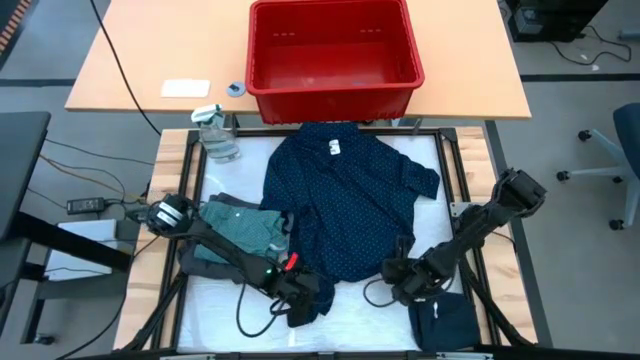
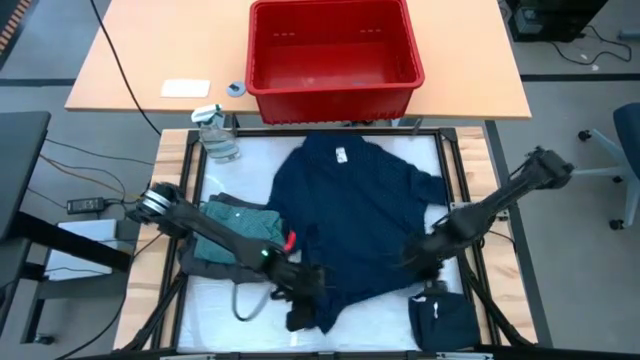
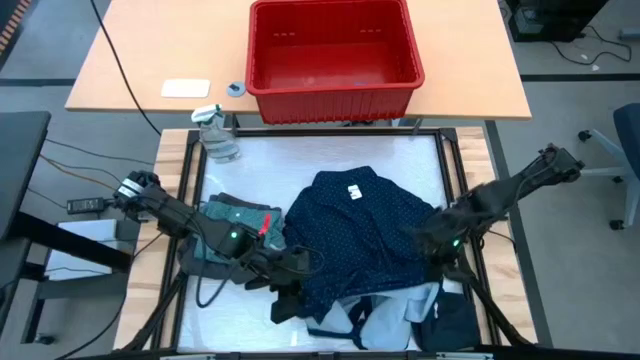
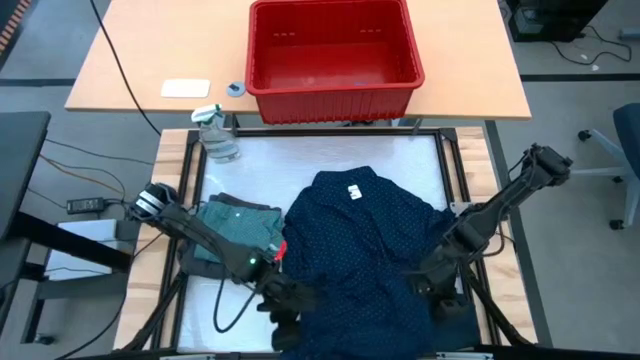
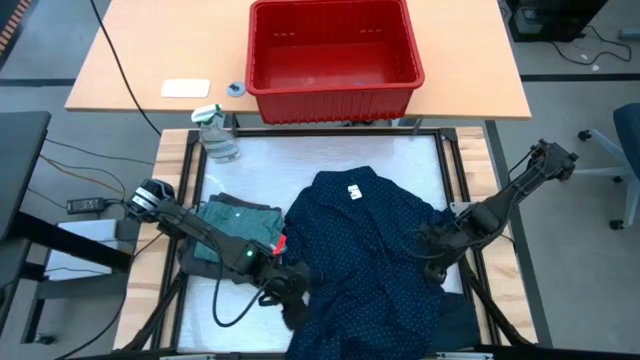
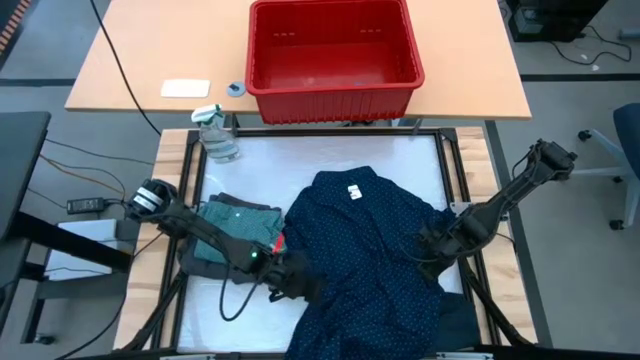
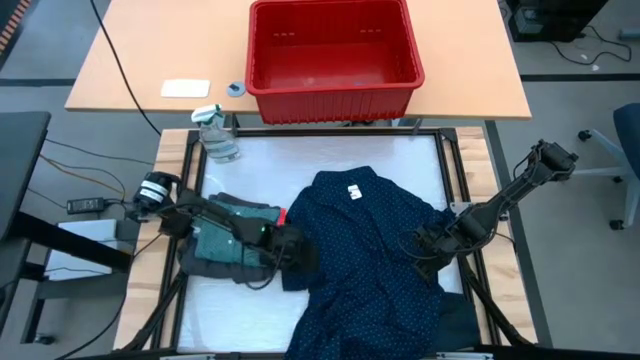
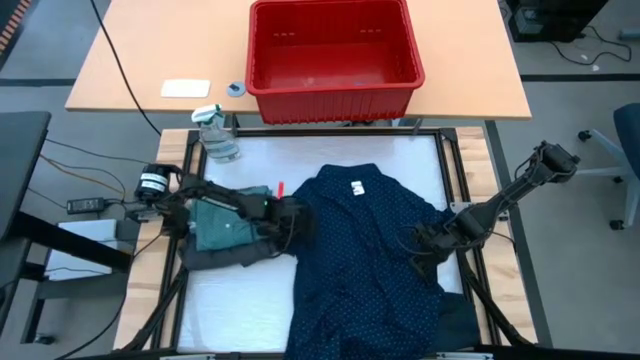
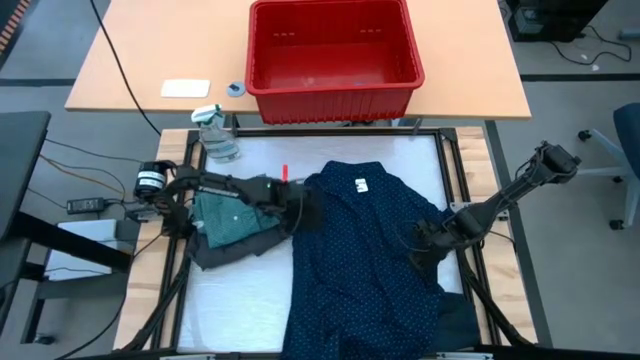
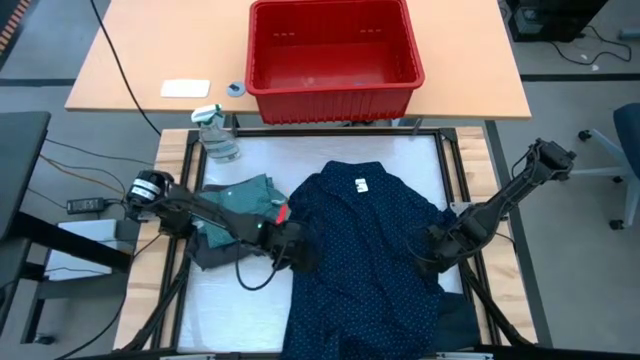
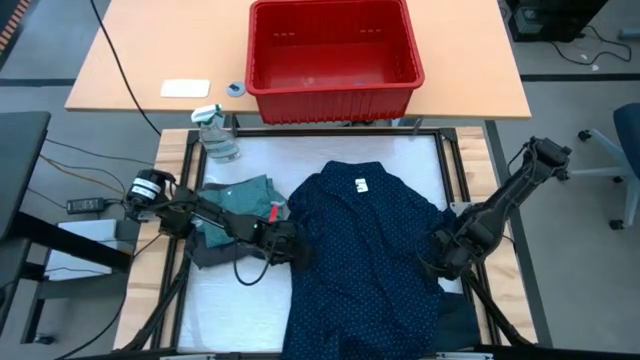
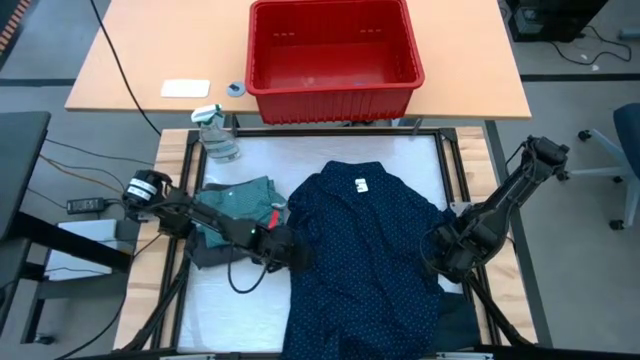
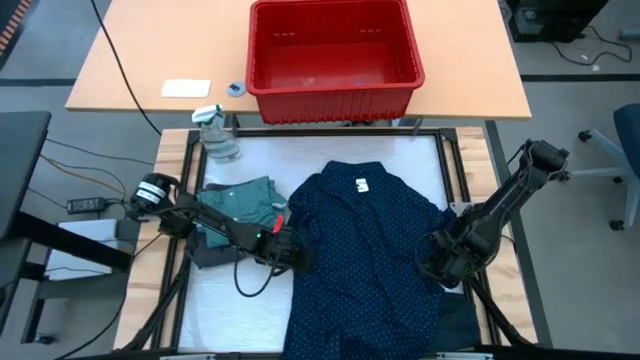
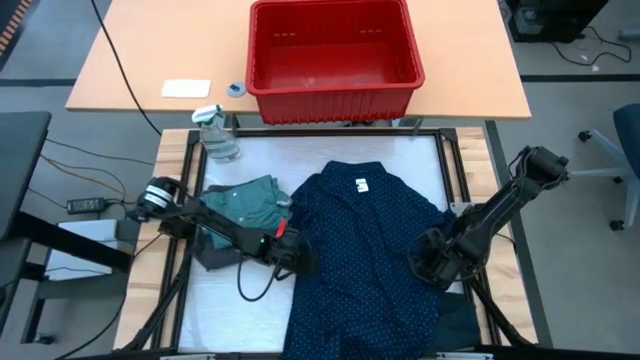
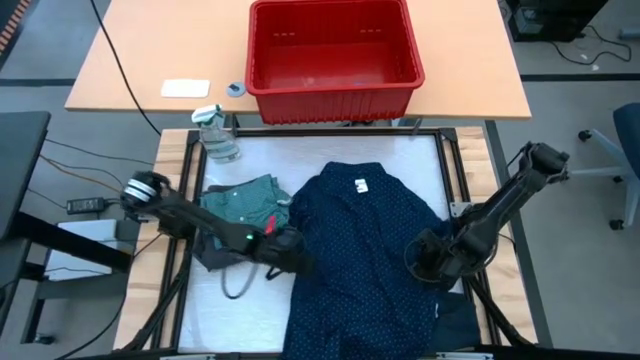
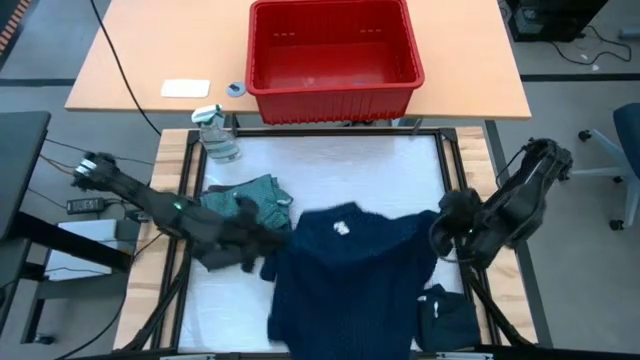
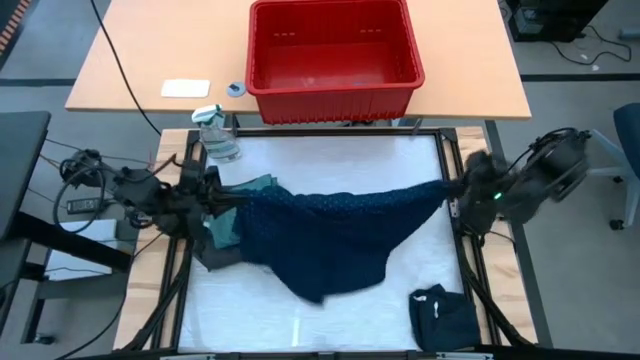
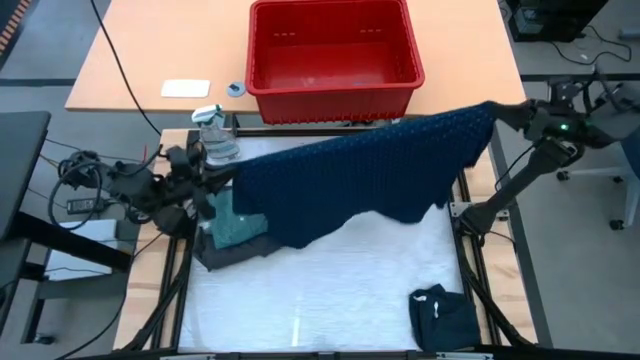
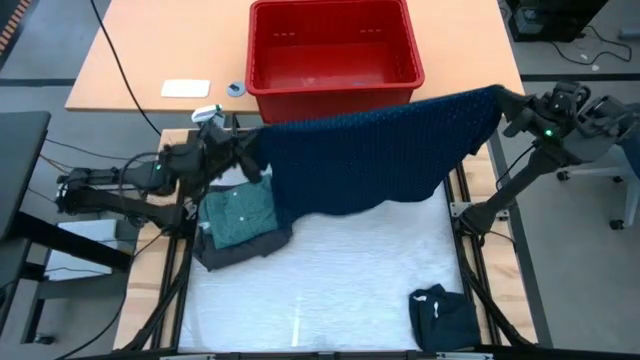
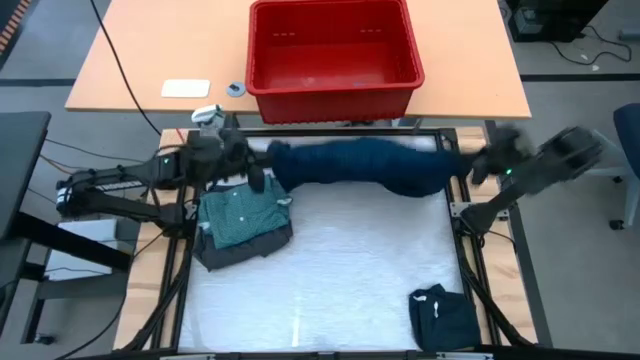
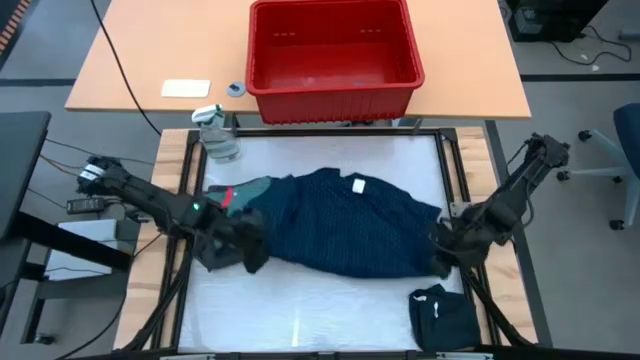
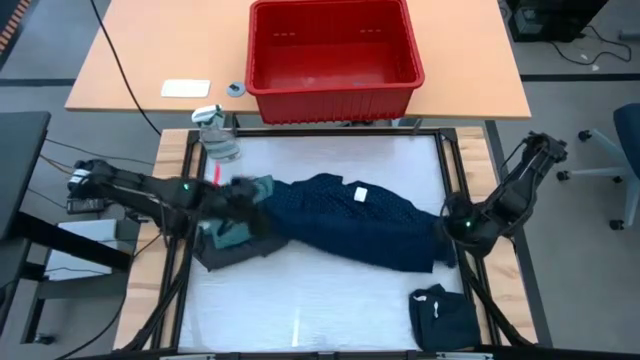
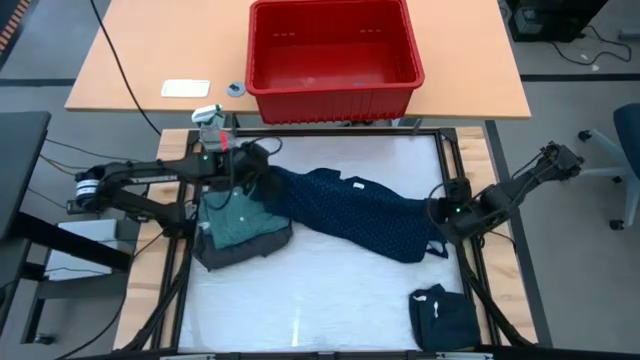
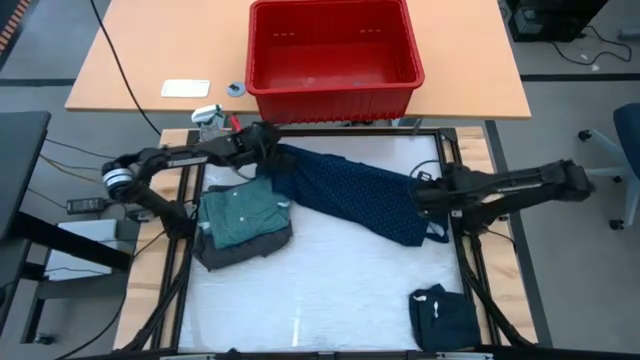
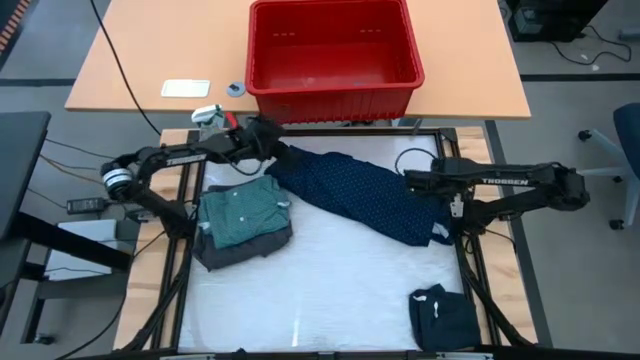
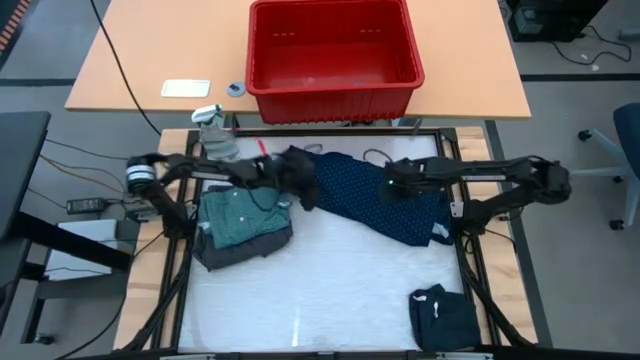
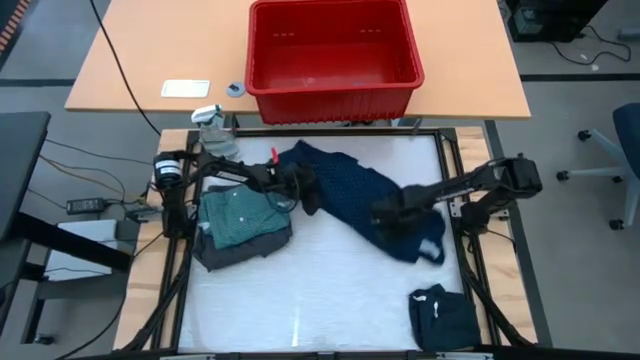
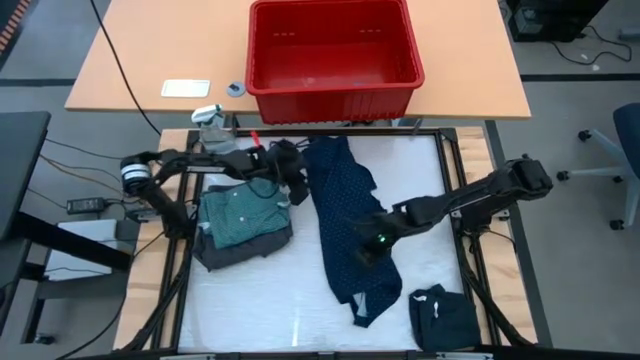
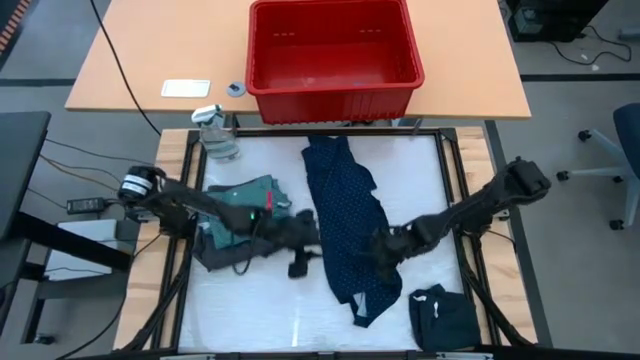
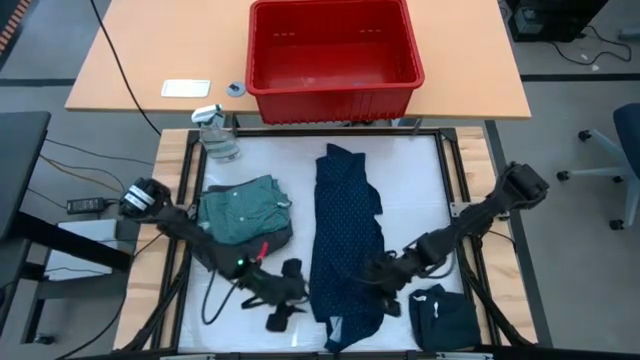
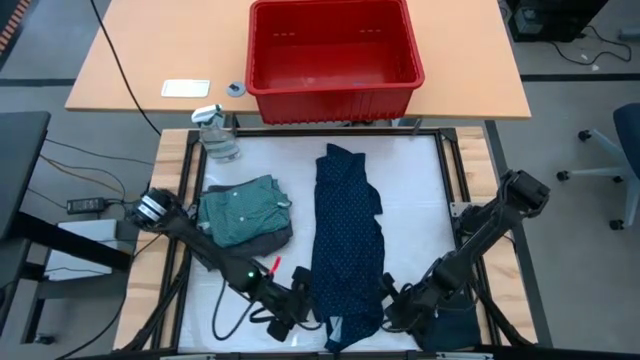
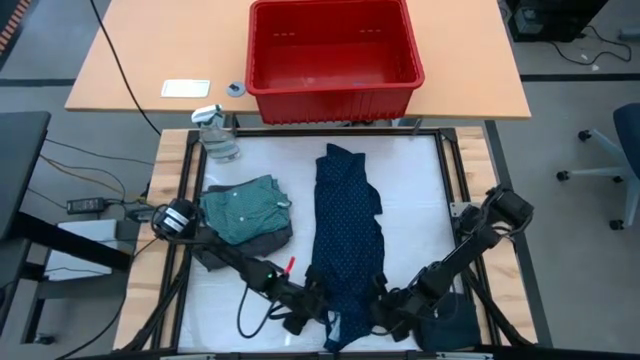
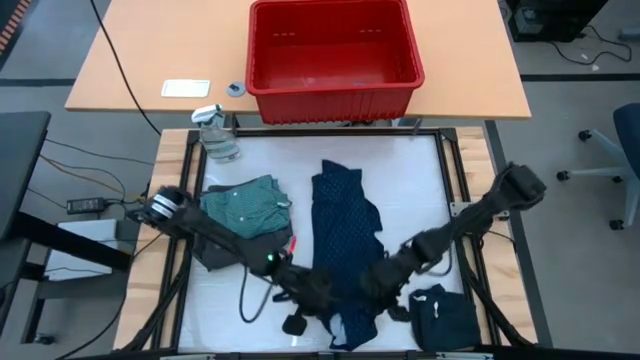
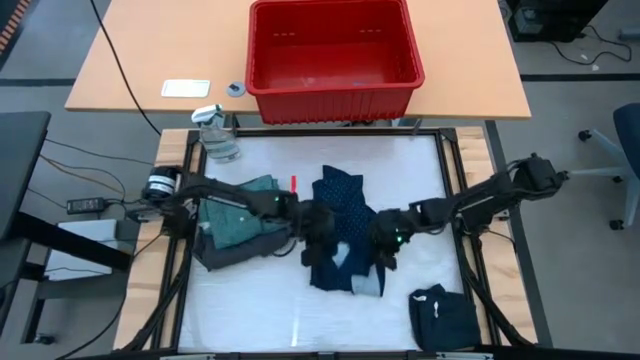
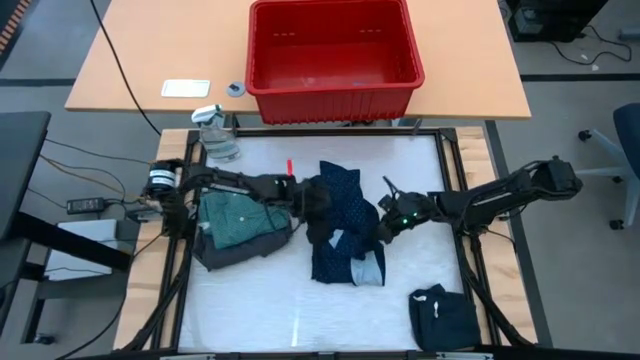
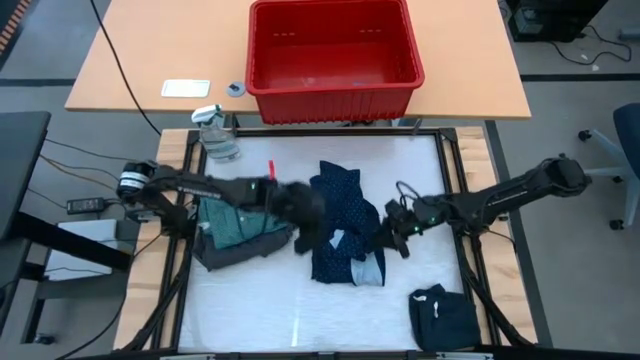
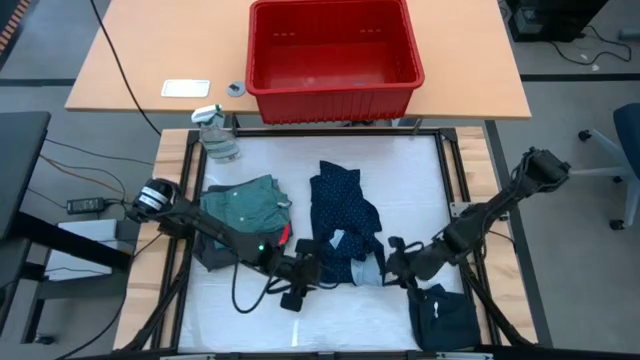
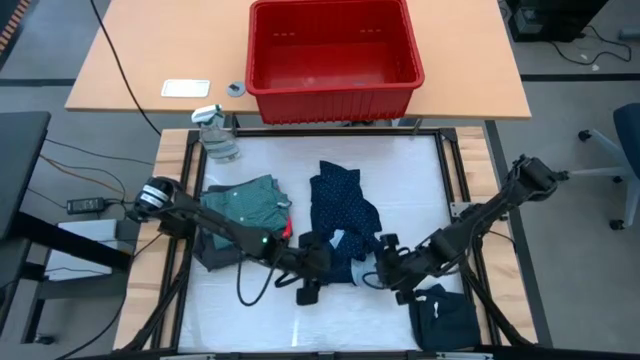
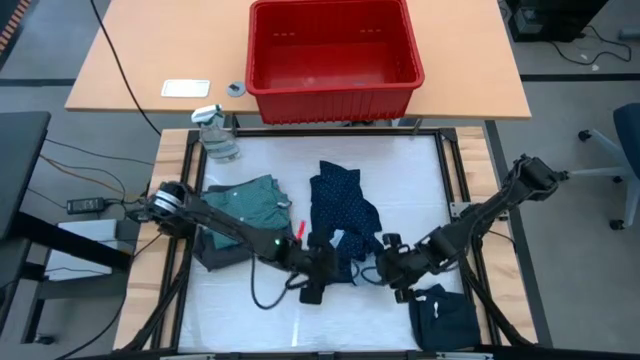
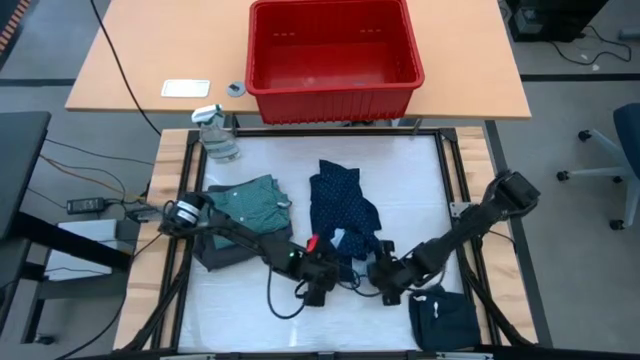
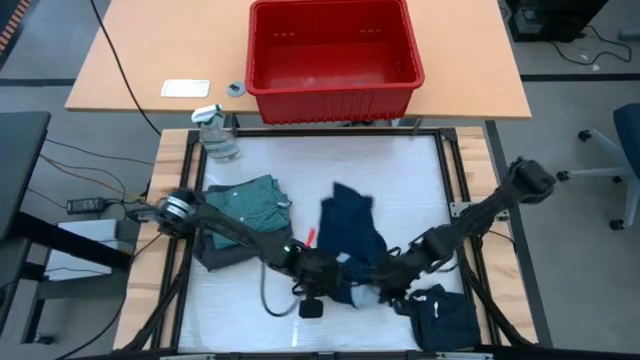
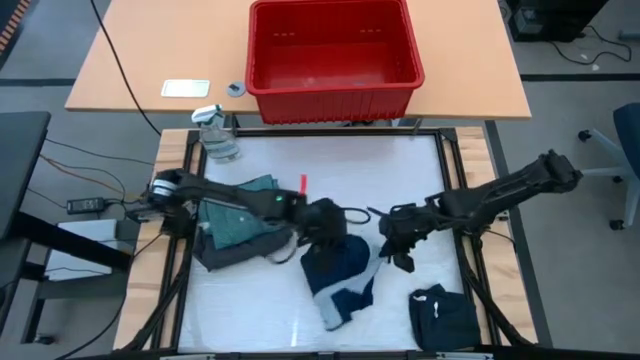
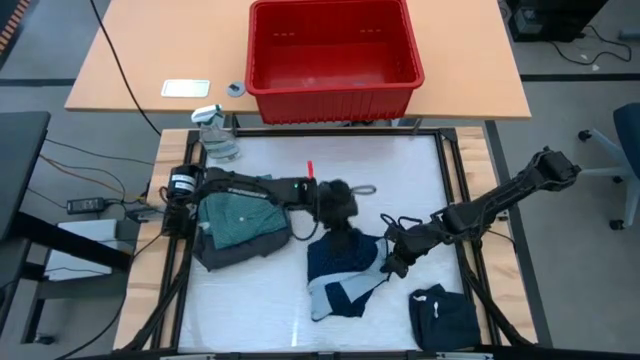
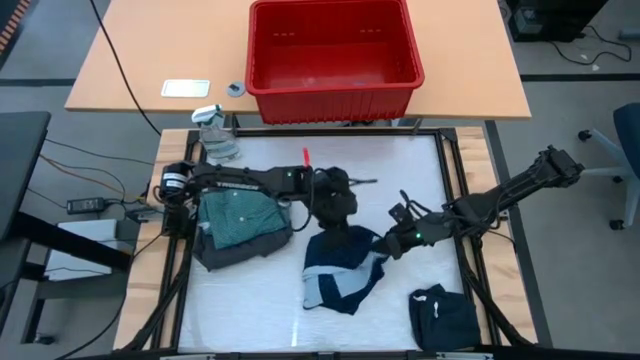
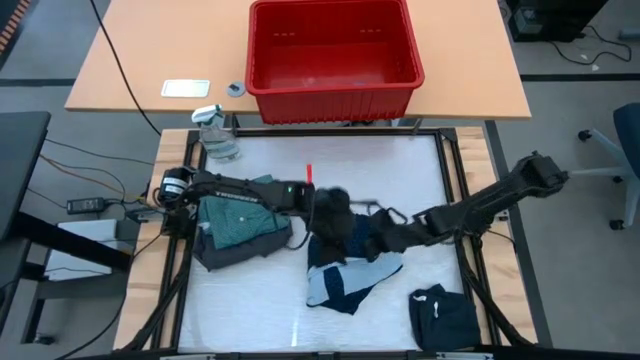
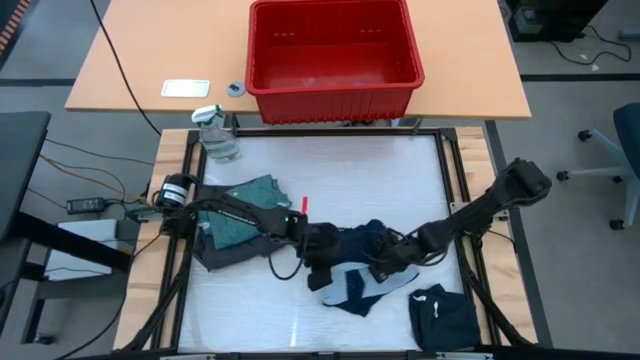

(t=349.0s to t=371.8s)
Task: Fold Laundry from Bin
Fold the blue polo shirt on the table
